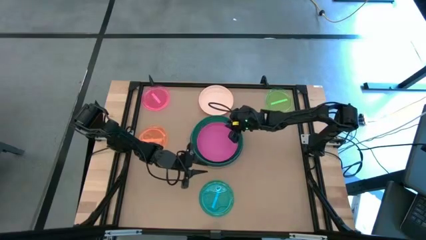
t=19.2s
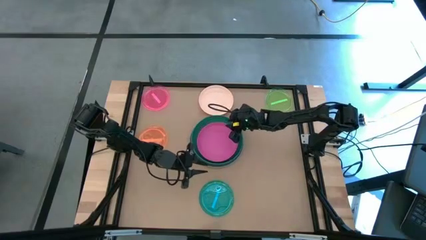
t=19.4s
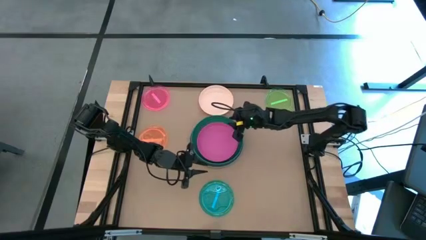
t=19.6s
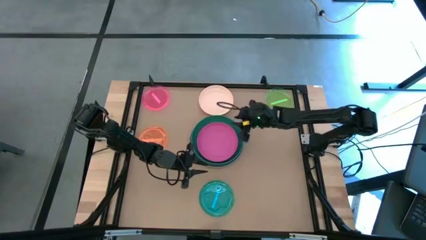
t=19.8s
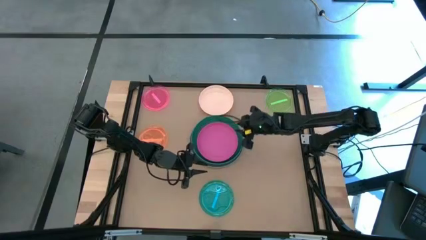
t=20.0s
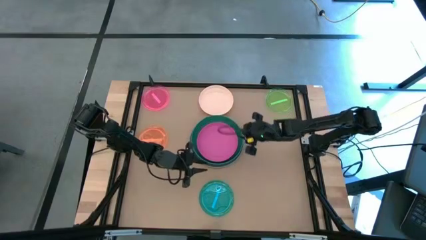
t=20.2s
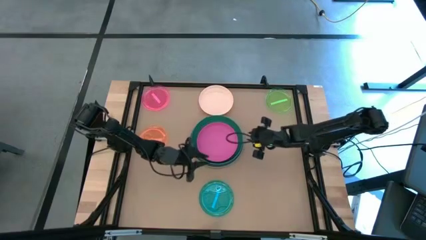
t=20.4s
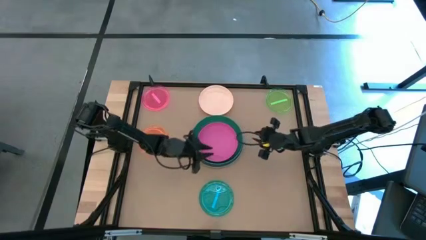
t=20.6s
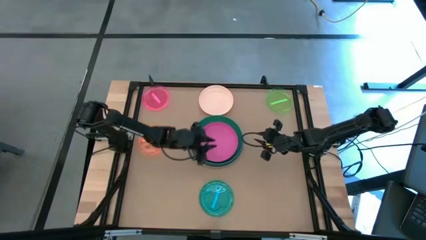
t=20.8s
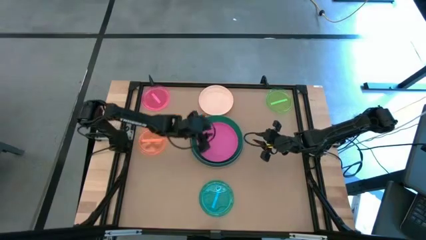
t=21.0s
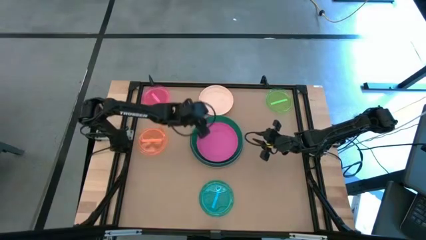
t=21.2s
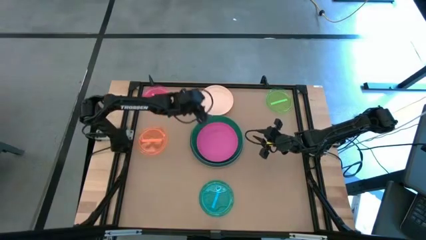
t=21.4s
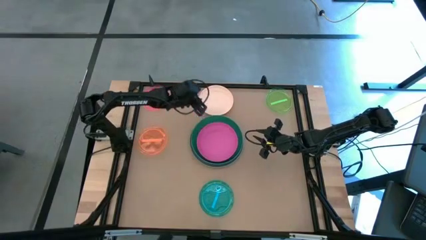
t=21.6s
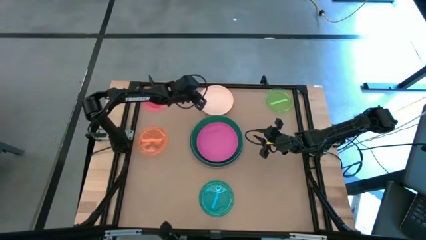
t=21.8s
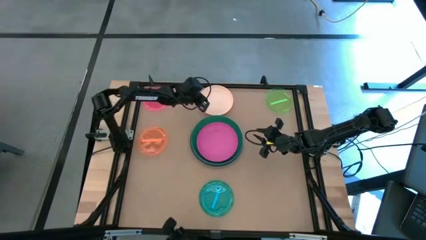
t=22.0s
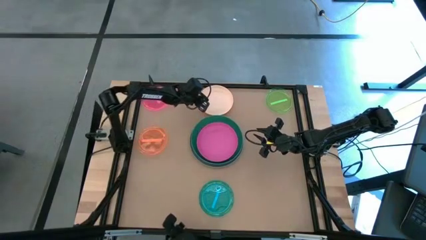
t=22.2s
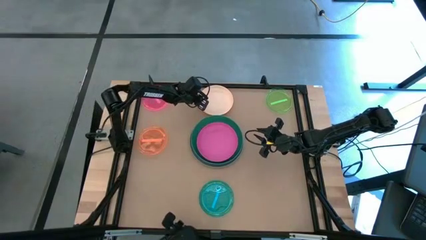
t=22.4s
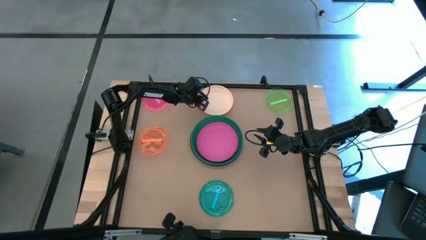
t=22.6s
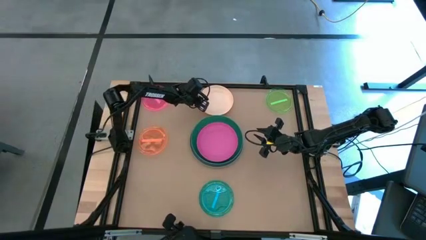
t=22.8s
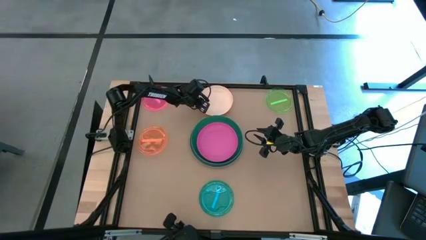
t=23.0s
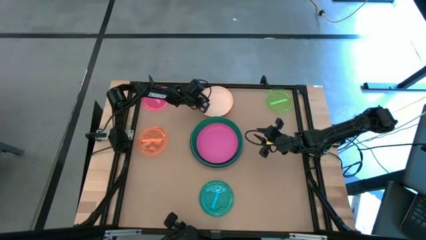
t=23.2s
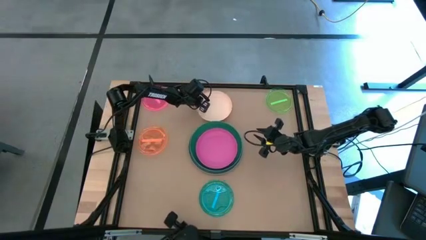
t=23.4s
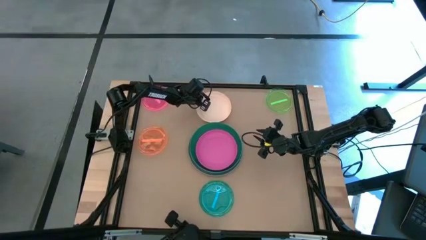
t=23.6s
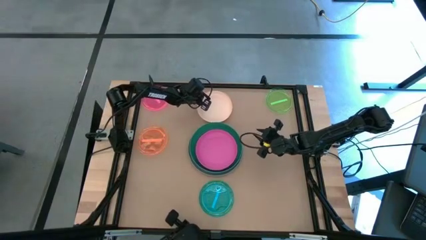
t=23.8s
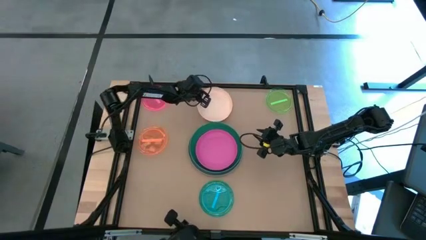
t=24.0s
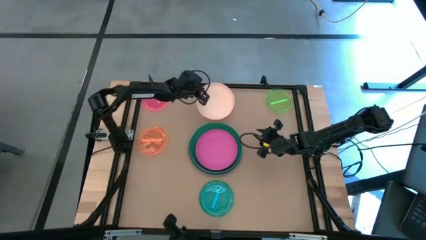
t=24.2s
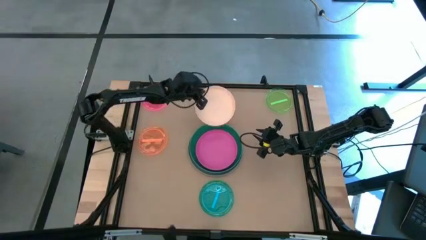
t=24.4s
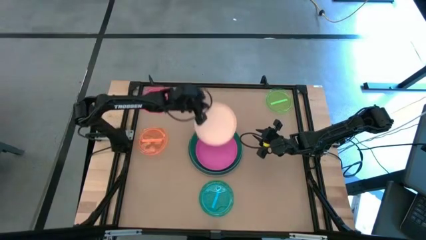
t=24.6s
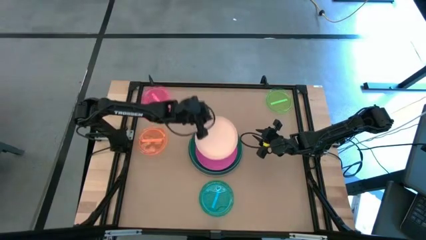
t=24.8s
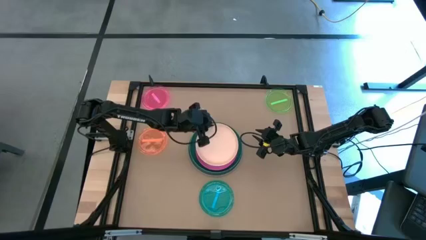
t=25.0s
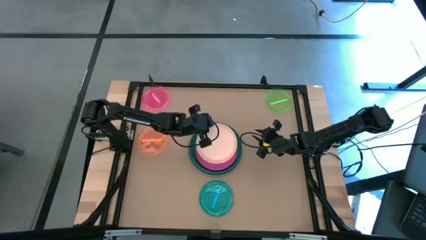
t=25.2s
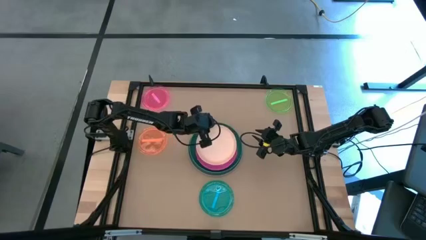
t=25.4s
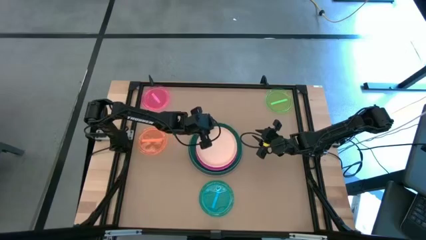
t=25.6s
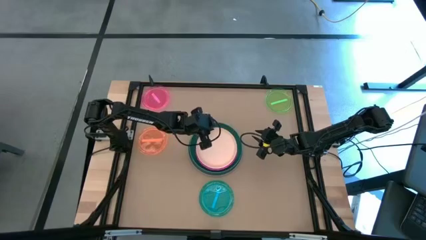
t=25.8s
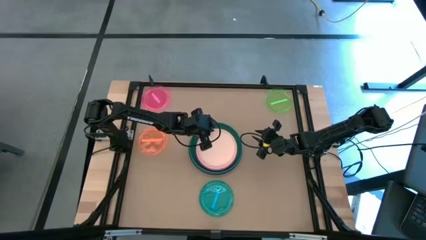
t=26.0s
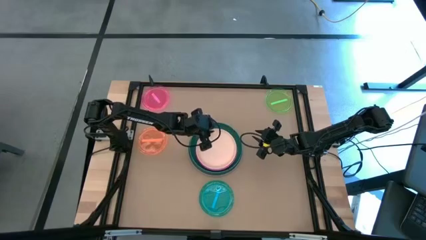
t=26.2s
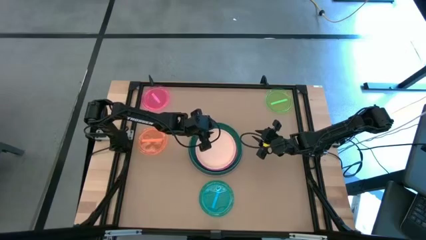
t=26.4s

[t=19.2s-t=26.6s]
Task: Stack plastic plates
Stack the white plate on top of the pink plate

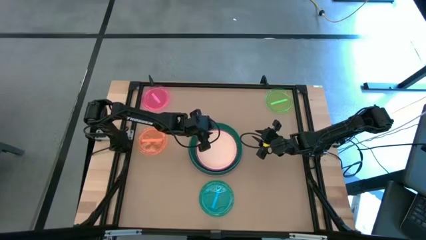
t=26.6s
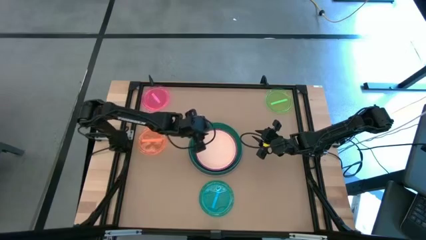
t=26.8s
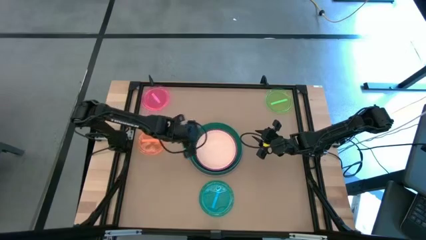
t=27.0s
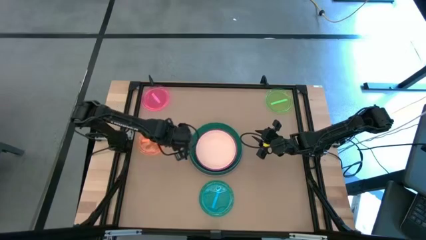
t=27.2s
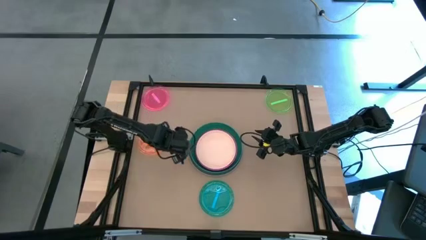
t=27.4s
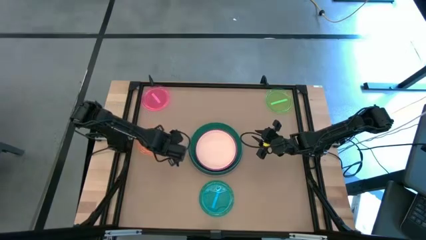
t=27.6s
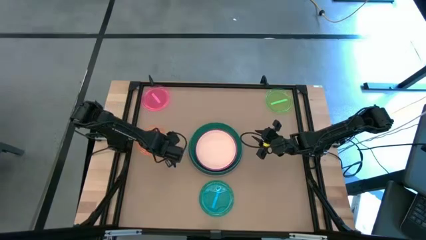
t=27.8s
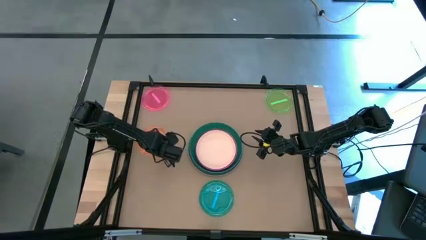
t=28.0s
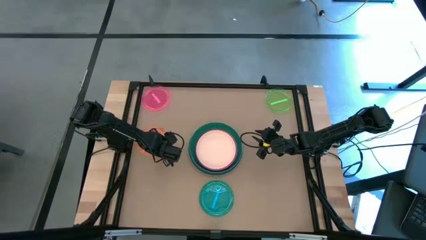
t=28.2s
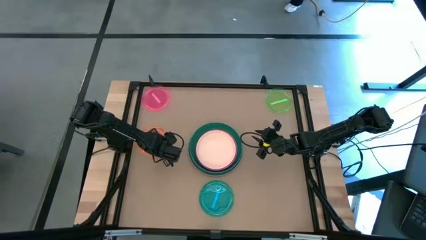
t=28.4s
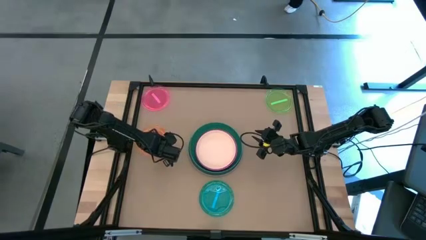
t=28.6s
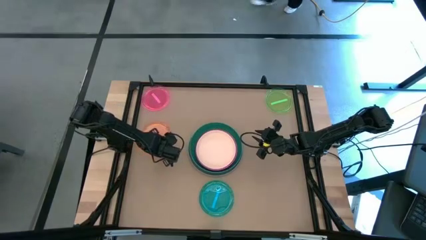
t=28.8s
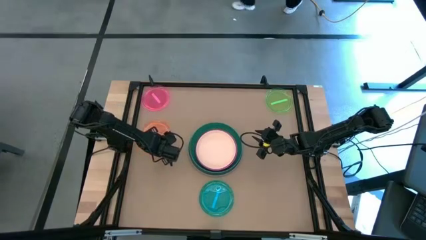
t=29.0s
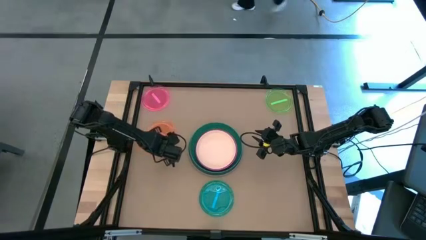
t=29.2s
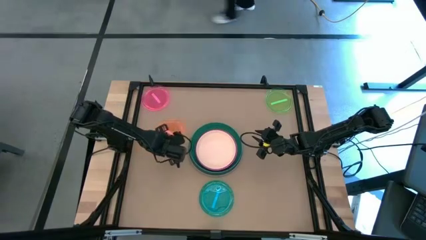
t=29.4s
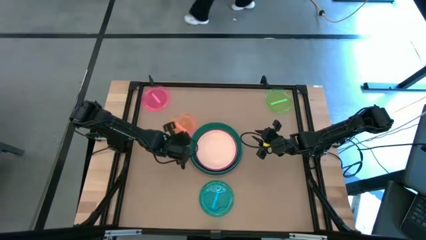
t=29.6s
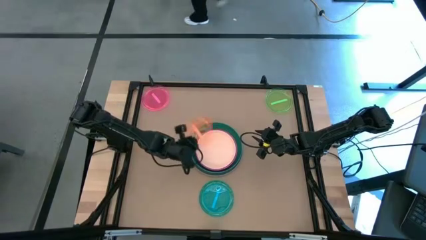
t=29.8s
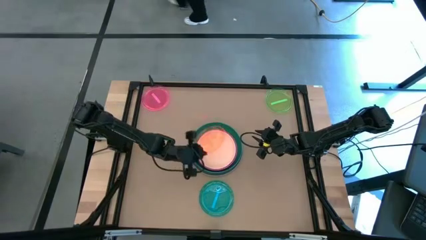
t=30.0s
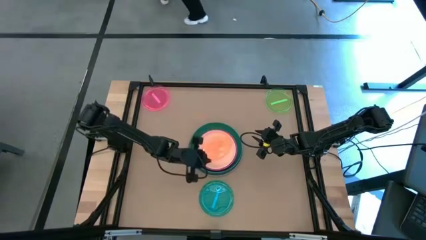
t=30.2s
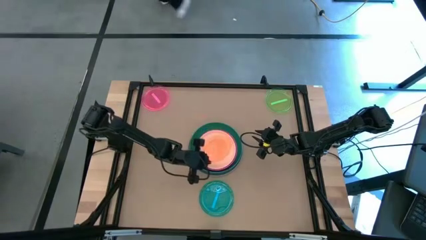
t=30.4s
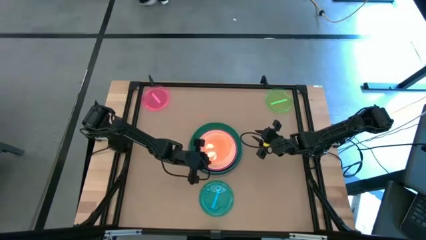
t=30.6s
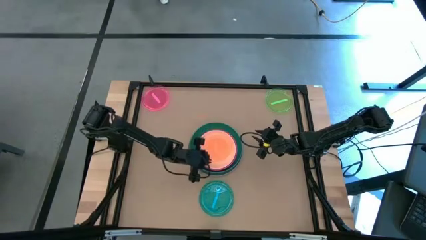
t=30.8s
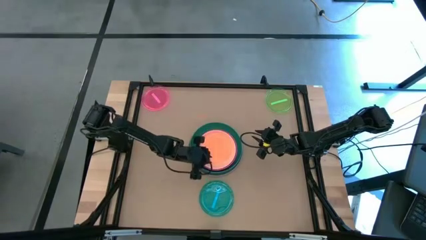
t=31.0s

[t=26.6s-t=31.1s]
Stack the orange plate on top of the white plate

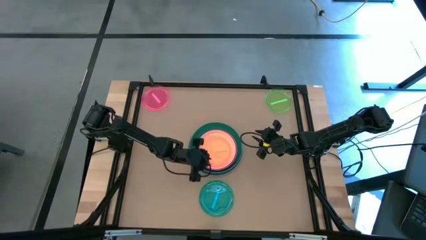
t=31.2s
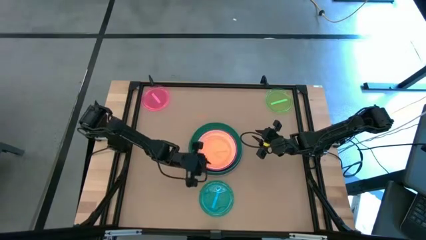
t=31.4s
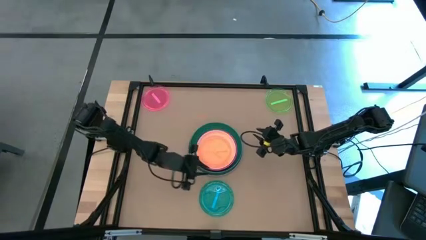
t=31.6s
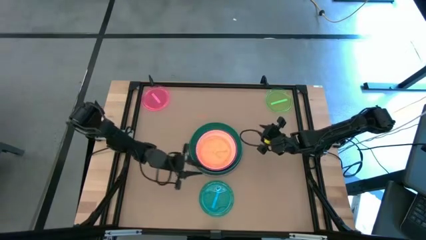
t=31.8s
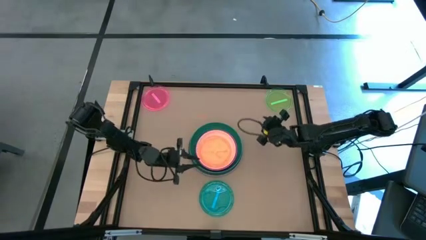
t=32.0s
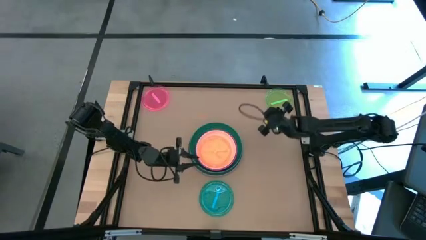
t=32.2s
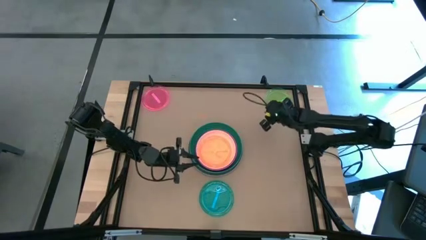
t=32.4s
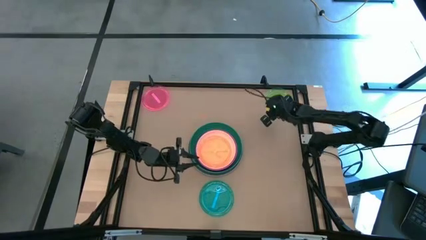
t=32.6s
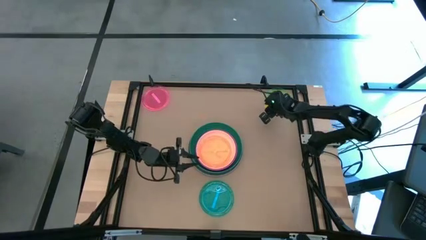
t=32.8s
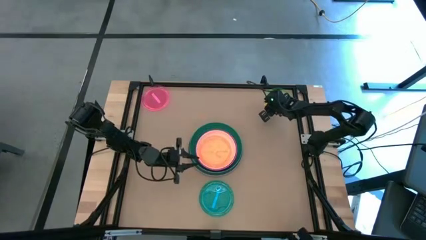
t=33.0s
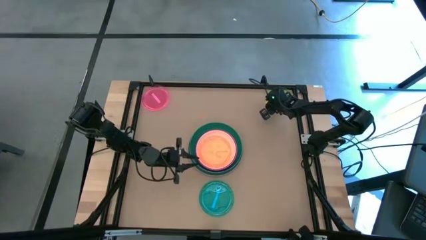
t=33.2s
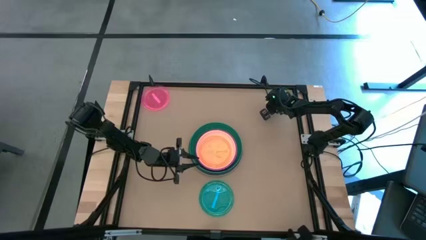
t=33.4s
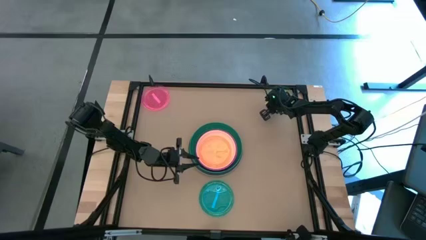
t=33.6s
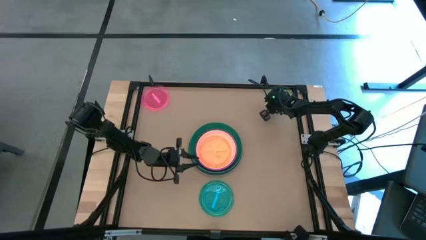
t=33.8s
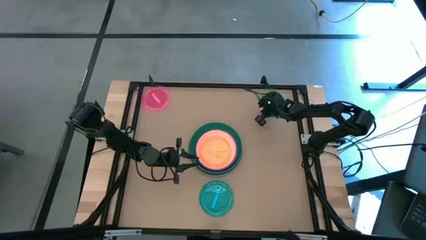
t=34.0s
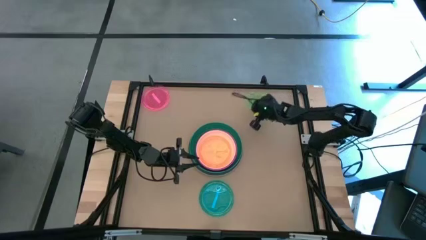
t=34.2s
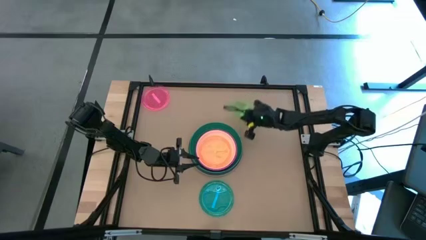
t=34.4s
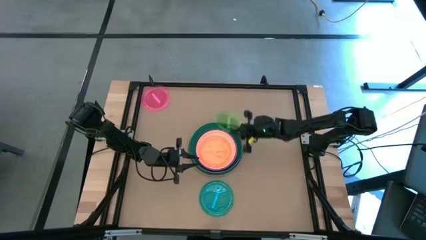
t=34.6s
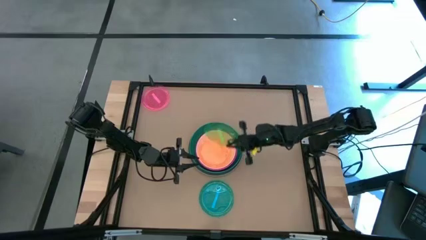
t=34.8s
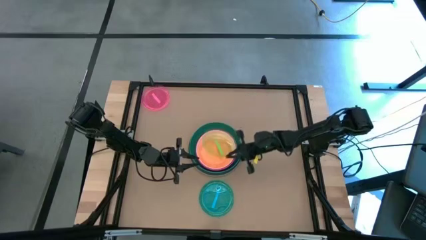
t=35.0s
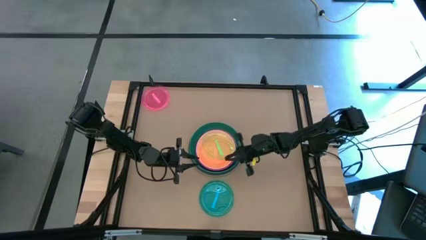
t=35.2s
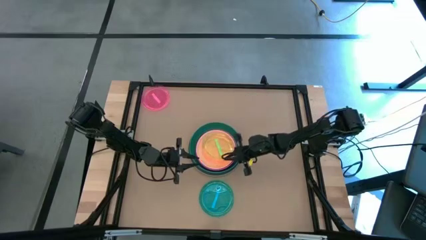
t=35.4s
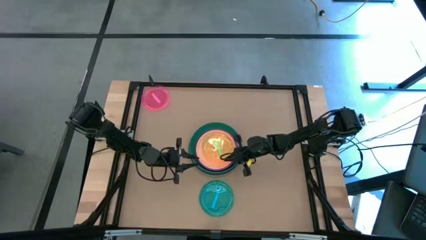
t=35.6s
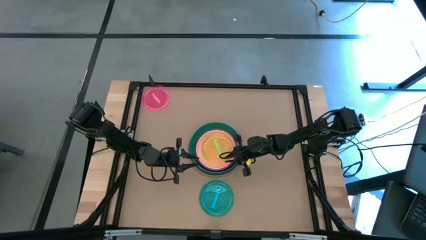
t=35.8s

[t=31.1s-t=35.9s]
Stack the green plate on top of the orange plate

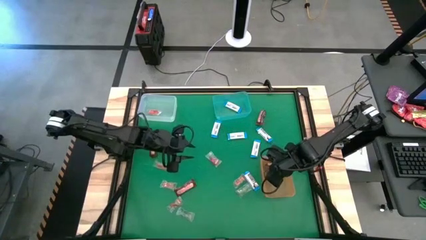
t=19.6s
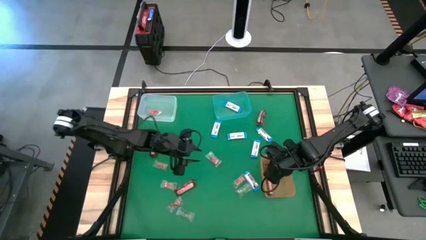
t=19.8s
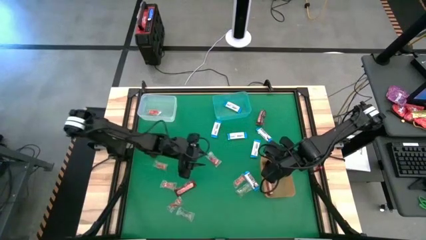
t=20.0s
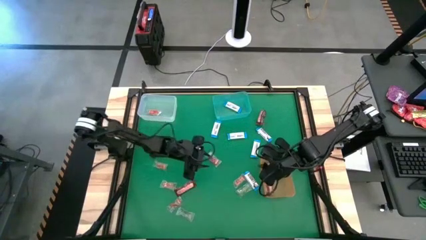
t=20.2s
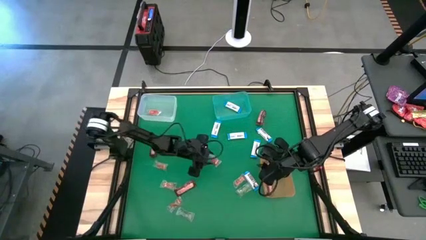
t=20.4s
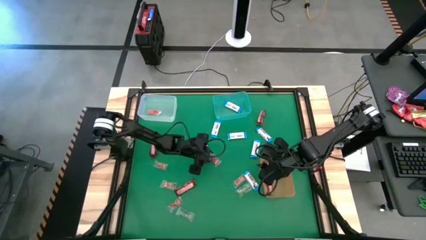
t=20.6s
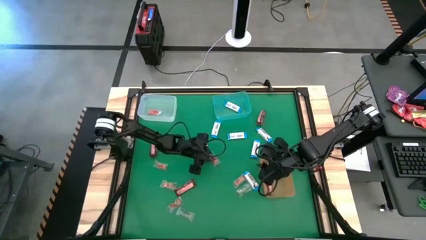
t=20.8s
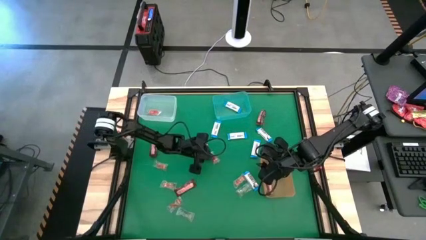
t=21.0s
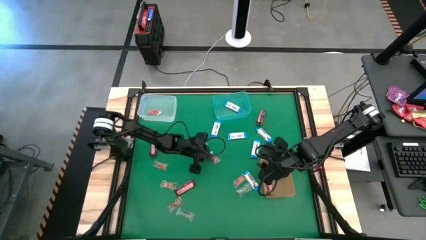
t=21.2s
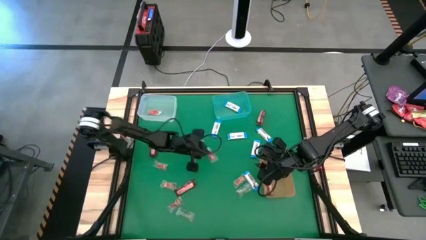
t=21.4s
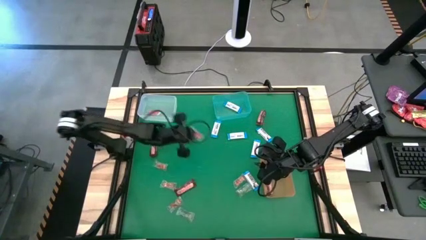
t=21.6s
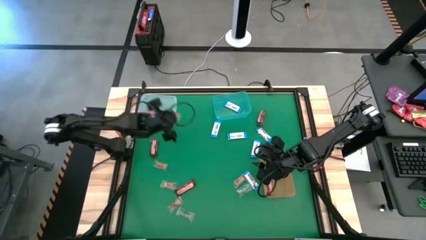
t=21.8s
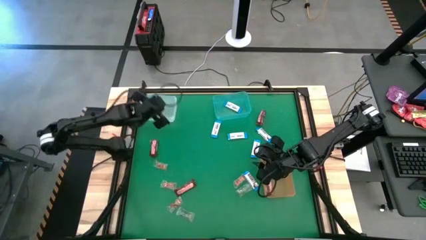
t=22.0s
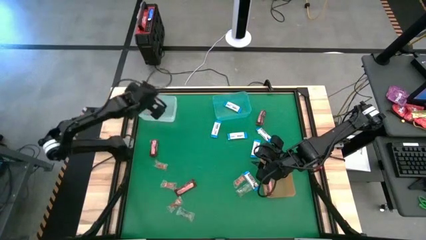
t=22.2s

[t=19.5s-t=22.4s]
Task: Sort candy by brand, put in halloween buckets
Put the red gummy into the white bin
